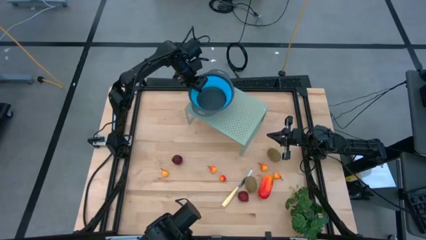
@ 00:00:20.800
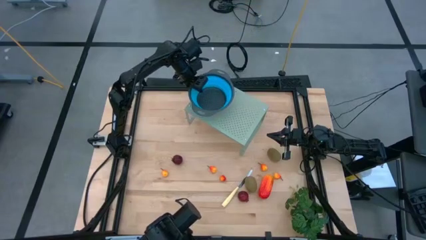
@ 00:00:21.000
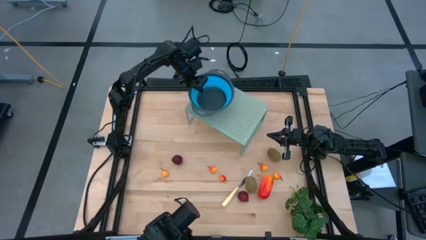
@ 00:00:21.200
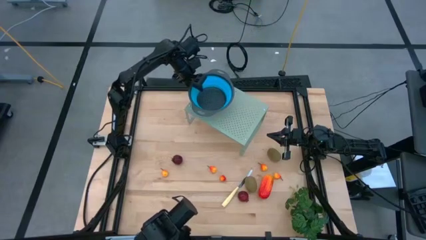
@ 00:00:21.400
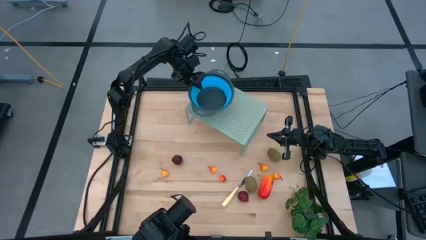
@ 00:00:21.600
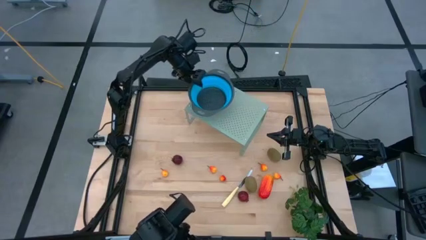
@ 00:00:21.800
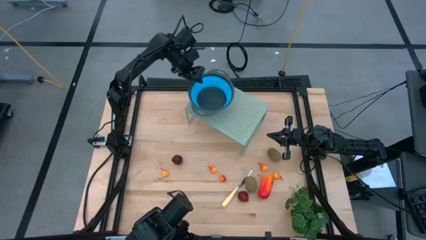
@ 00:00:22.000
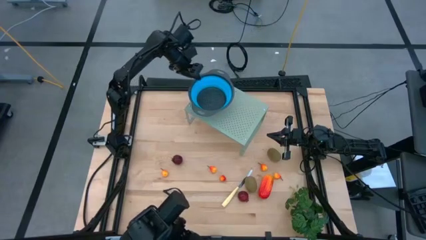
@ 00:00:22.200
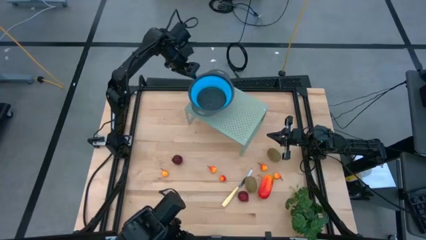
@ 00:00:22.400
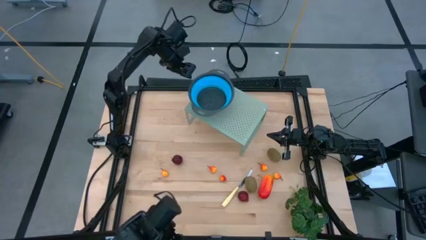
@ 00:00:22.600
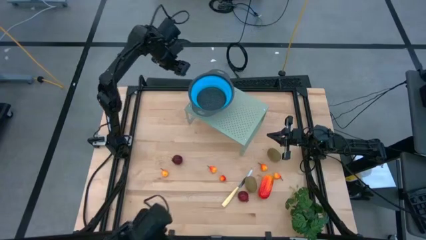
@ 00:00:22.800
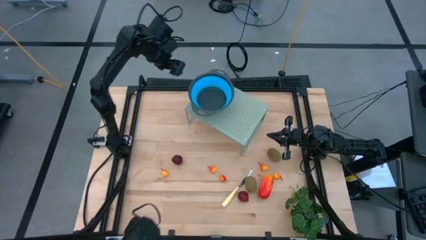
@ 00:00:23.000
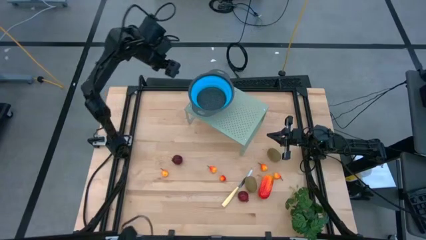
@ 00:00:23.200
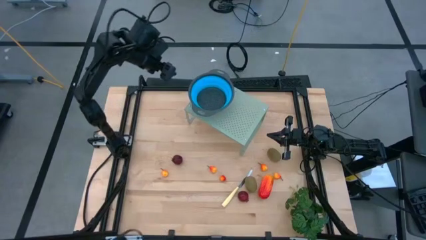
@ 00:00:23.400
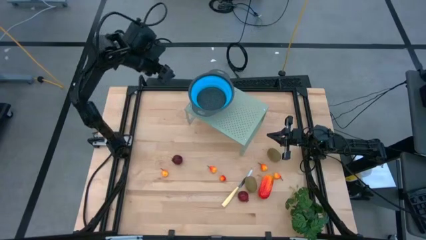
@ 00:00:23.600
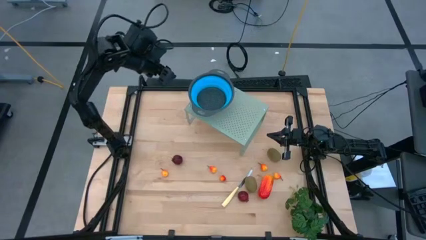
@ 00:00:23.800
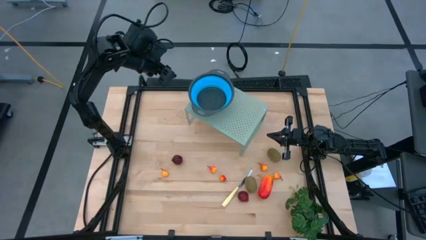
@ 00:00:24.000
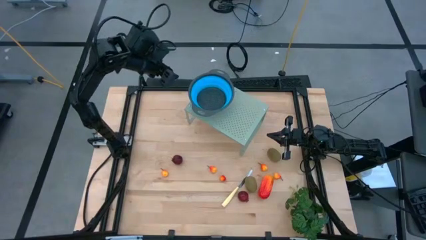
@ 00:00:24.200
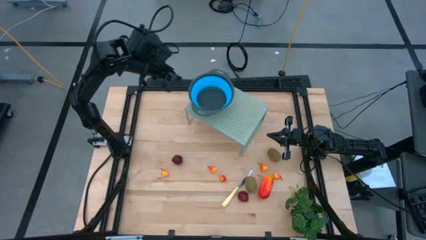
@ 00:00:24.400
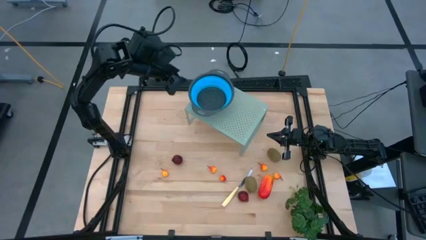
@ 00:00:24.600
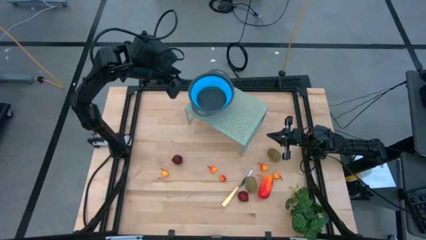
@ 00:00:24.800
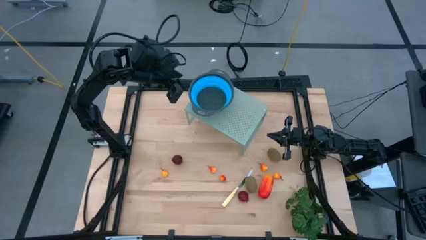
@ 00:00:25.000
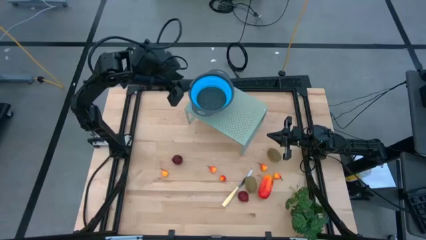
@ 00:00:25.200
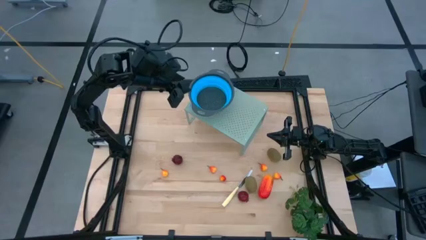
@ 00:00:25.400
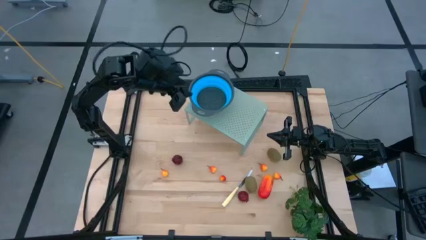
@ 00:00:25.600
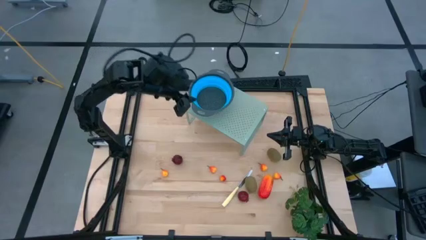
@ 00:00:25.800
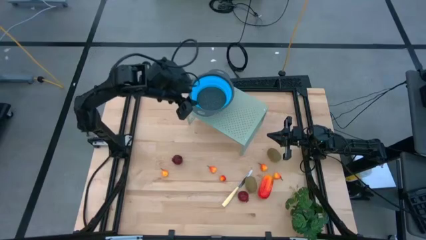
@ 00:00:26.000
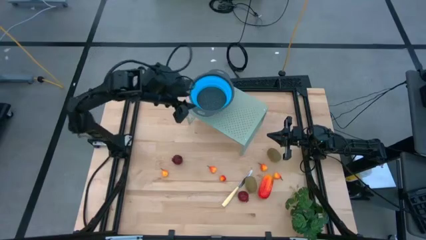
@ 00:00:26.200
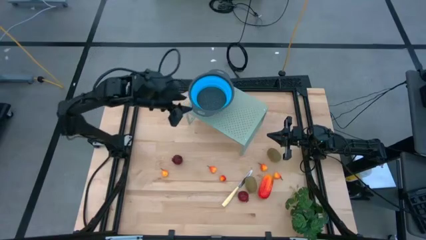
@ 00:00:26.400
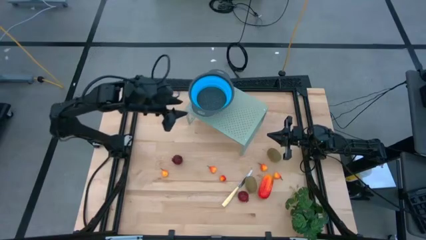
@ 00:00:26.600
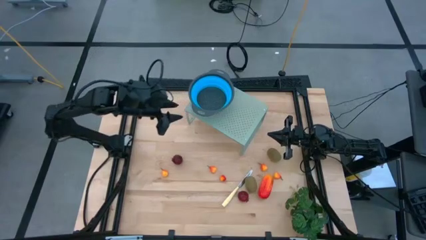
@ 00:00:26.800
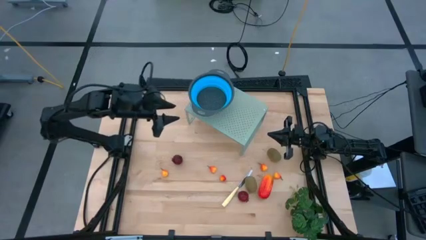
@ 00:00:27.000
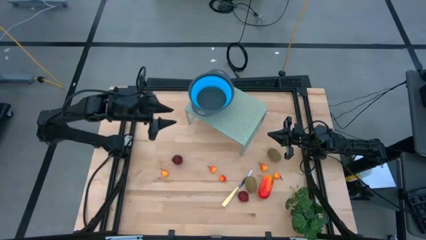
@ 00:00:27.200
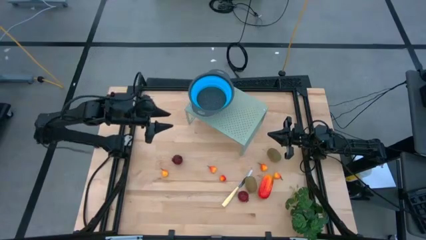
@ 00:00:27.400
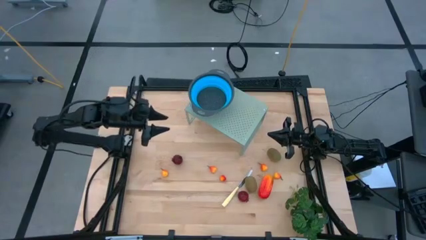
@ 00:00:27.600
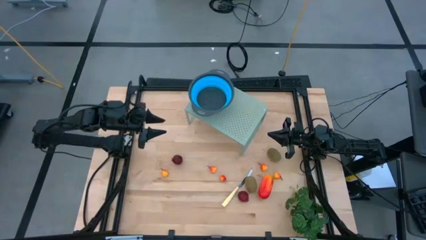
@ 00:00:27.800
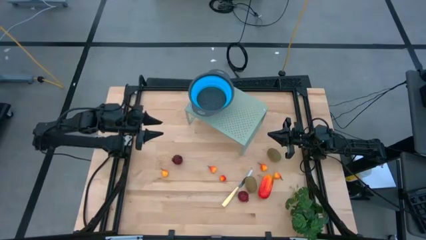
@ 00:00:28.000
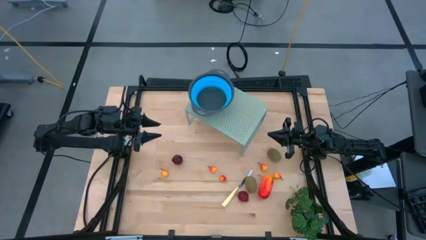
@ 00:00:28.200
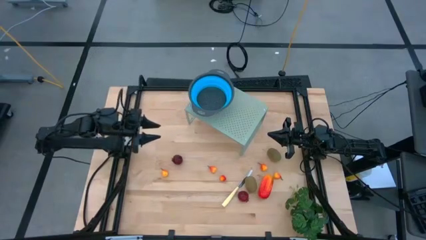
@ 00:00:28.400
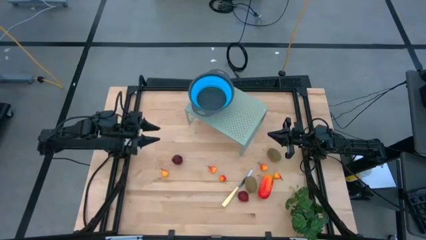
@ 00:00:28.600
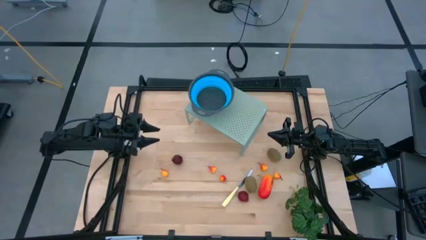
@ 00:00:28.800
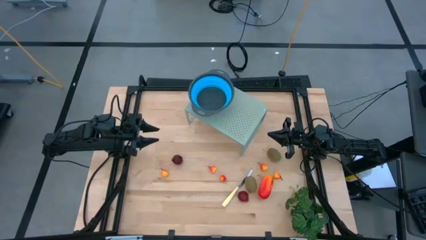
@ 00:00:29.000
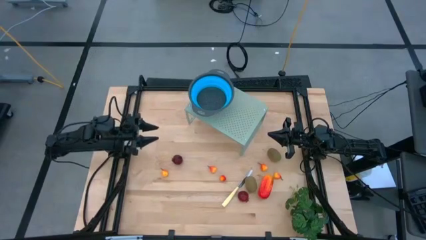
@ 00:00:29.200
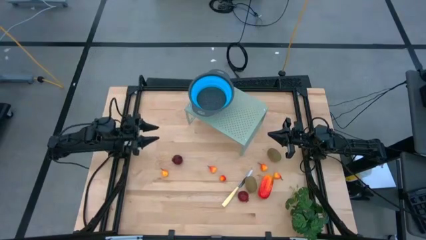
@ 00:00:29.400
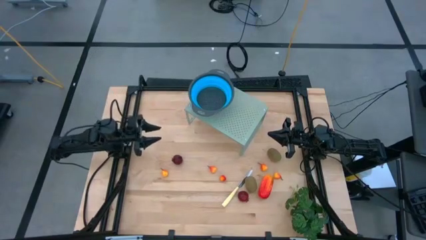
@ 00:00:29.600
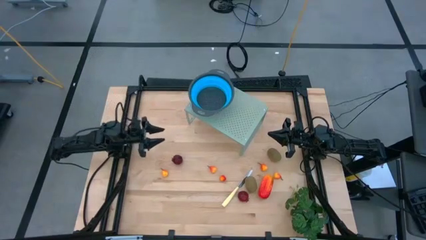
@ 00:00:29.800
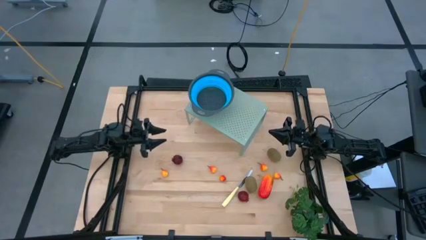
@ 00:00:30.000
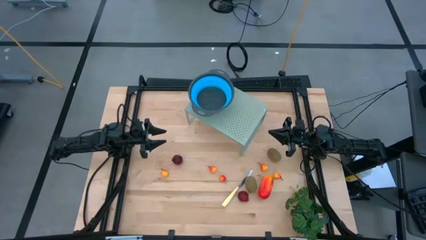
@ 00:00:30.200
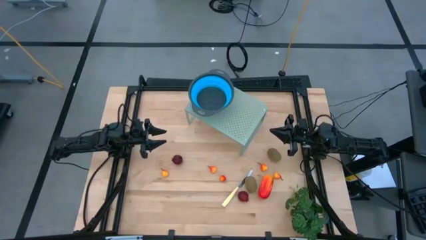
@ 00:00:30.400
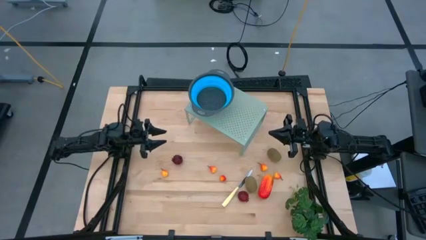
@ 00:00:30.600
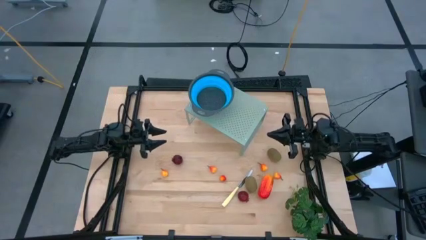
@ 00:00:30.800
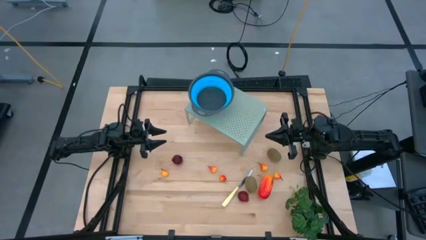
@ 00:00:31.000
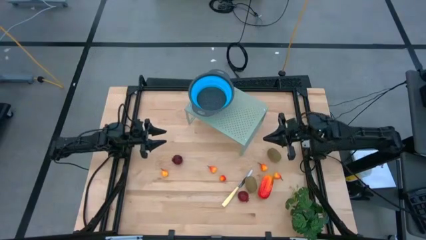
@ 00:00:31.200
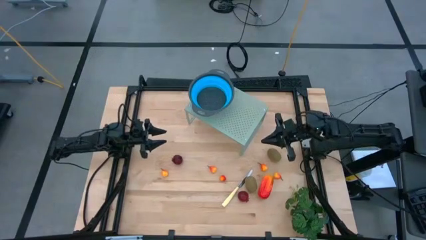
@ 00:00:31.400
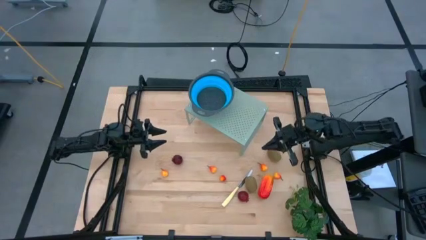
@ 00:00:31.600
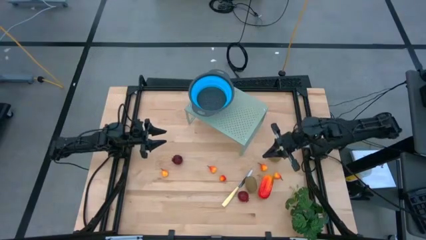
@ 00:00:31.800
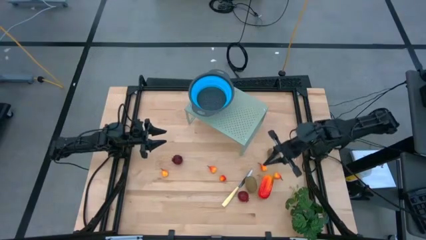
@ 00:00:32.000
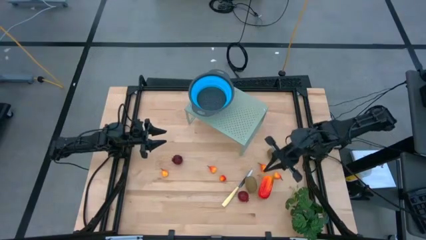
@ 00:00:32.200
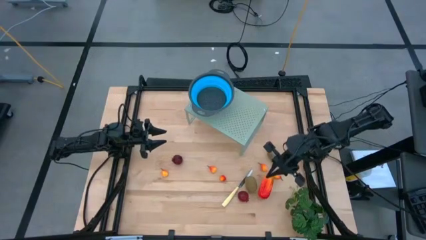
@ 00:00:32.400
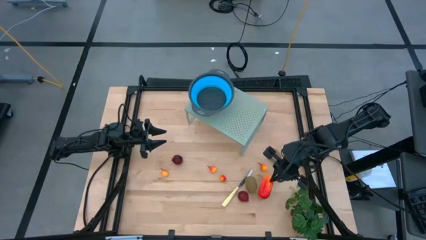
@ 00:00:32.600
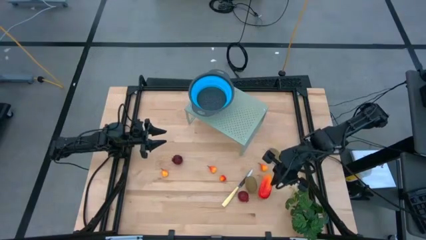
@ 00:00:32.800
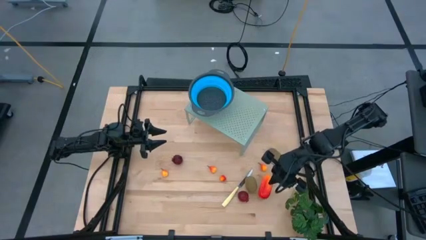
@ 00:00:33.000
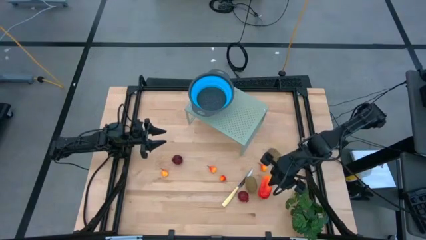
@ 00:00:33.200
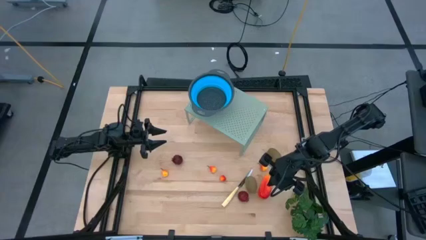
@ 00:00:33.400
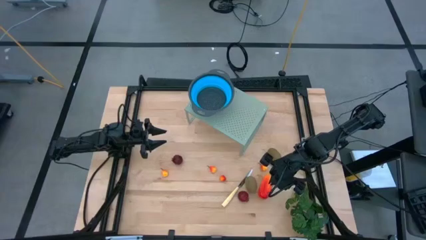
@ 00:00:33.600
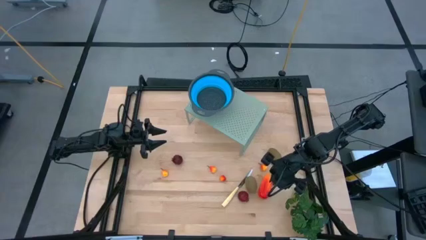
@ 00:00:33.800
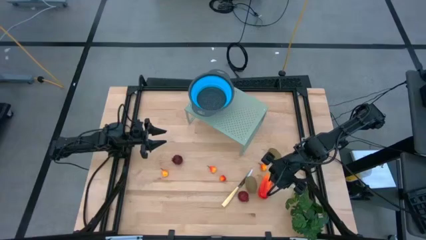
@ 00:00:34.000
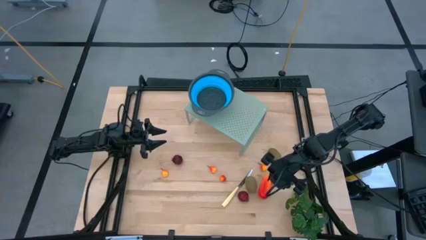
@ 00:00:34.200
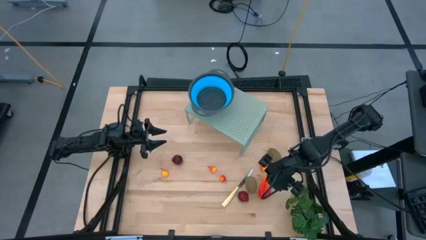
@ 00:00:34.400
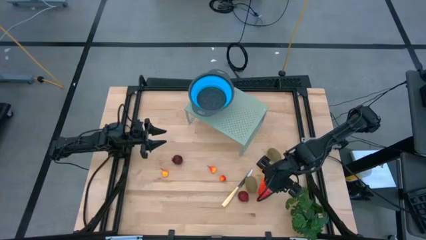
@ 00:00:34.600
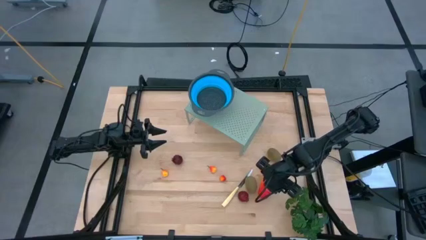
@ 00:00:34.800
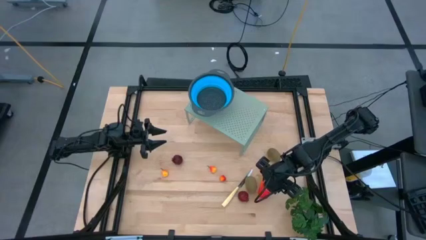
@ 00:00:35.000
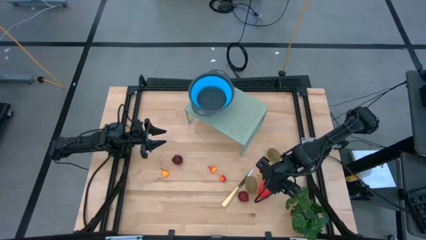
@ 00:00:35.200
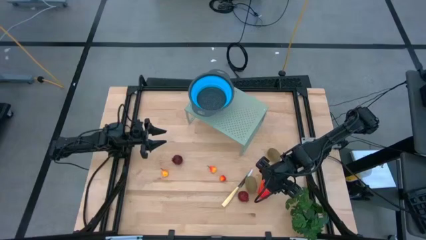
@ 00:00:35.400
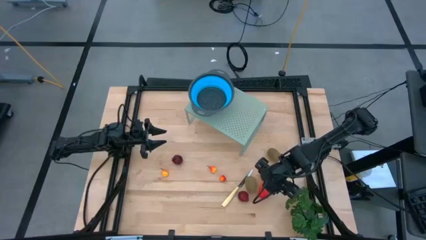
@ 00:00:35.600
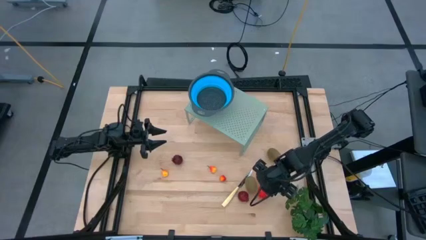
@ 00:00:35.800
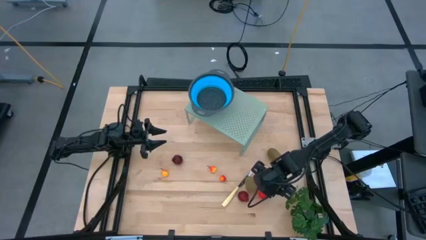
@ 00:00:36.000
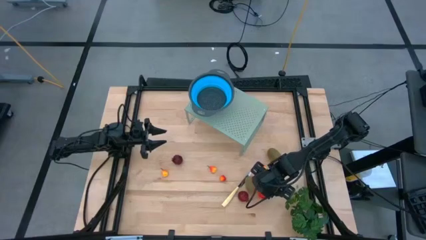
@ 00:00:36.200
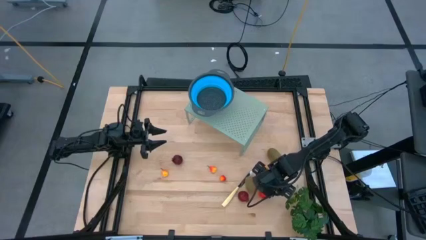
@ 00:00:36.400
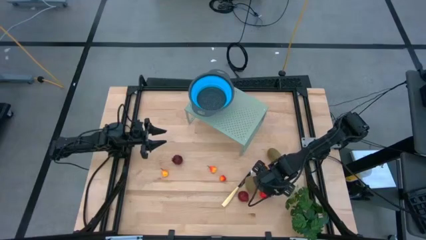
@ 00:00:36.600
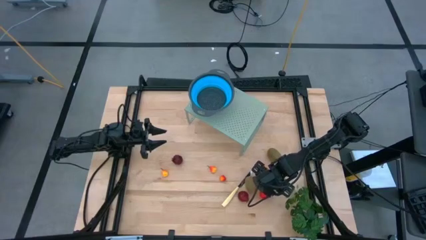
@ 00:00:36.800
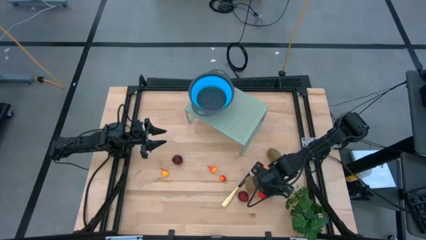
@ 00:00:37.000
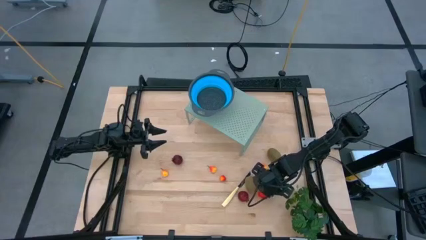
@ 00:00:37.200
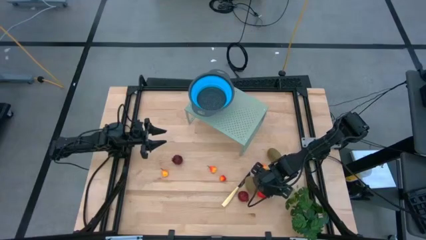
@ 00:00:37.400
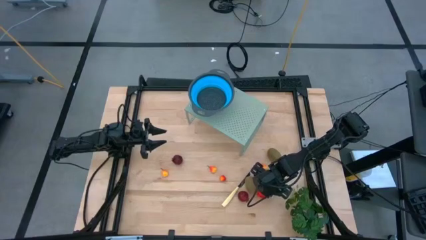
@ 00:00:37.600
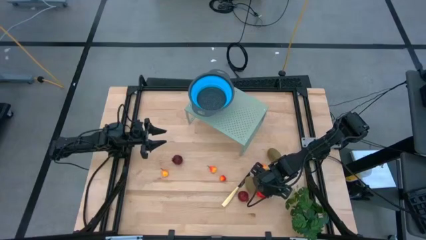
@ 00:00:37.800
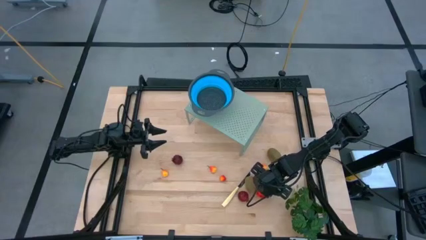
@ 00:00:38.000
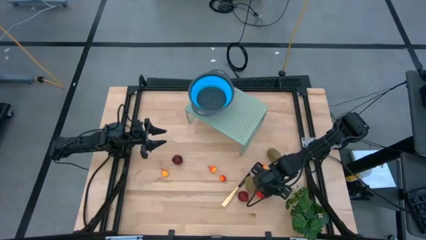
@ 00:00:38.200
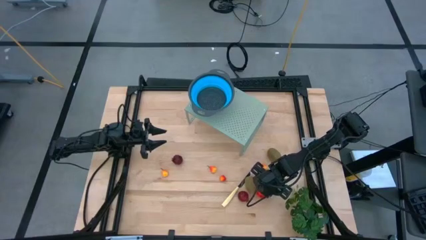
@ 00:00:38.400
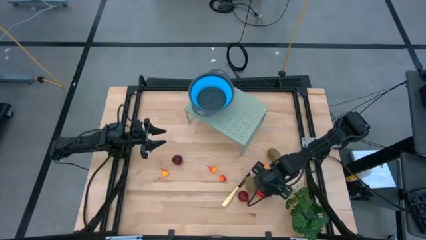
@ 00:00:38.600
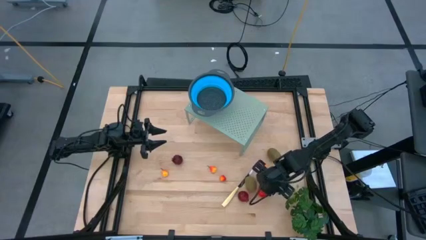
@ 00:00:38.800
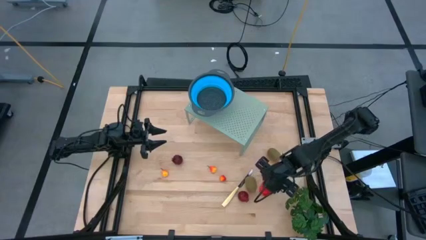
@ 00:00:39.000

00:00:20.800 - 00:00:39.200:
Task: Pick & Place Fruit
Put the mango into the blue strainer bowl on the shelf
